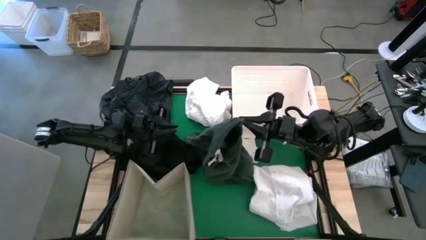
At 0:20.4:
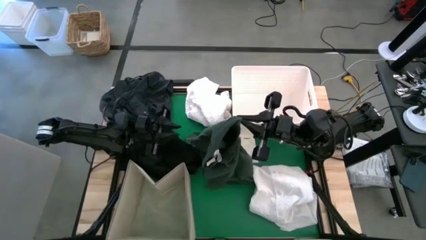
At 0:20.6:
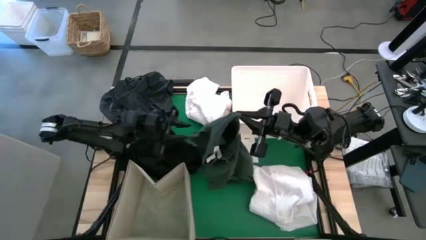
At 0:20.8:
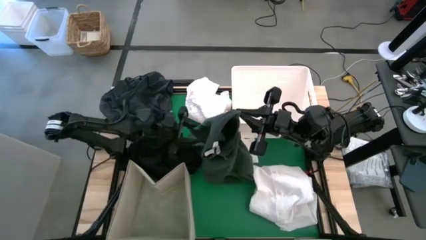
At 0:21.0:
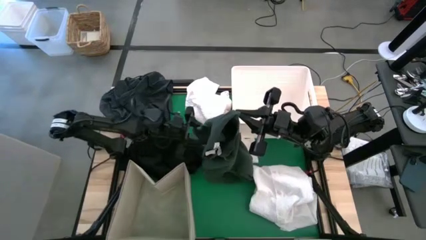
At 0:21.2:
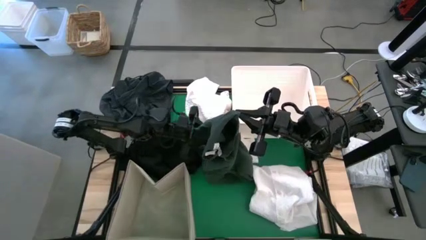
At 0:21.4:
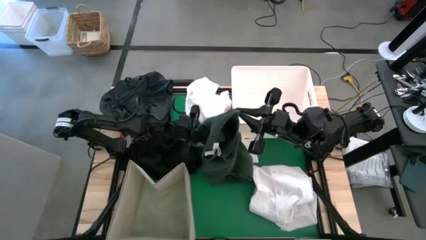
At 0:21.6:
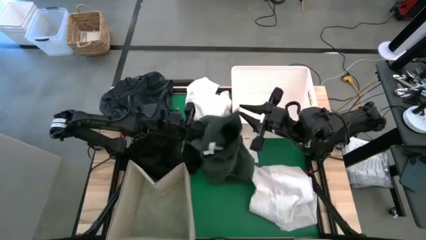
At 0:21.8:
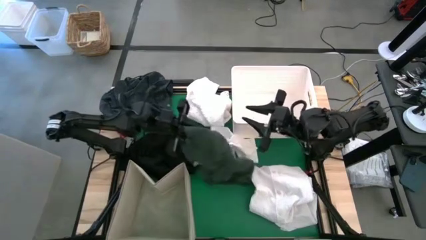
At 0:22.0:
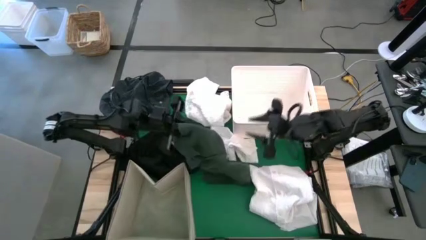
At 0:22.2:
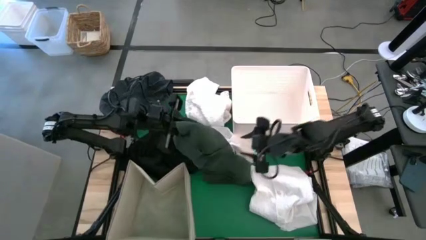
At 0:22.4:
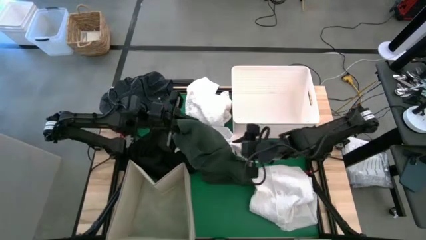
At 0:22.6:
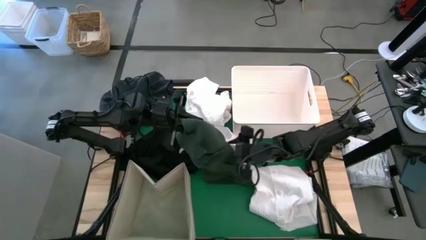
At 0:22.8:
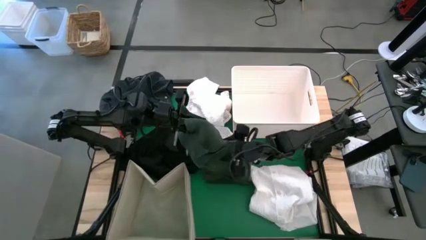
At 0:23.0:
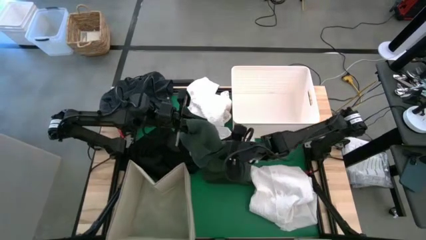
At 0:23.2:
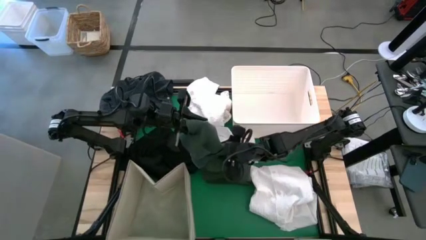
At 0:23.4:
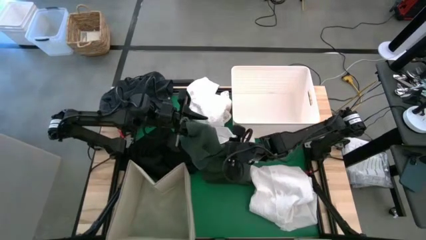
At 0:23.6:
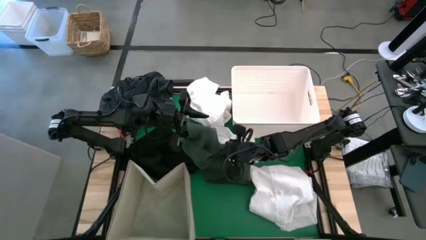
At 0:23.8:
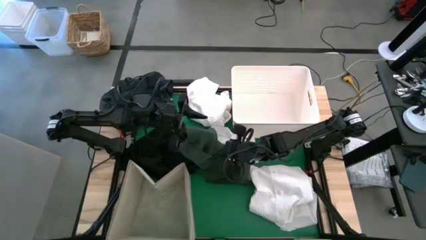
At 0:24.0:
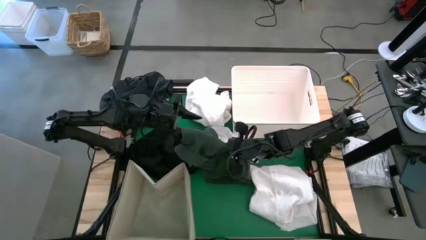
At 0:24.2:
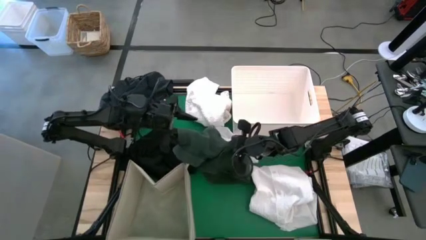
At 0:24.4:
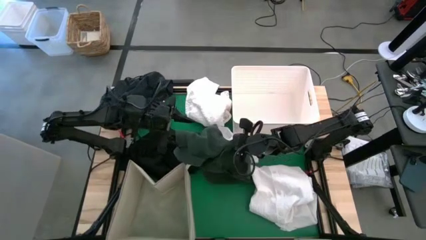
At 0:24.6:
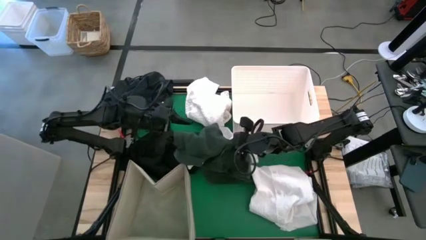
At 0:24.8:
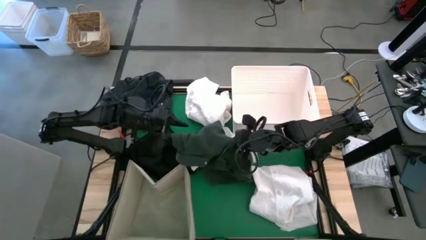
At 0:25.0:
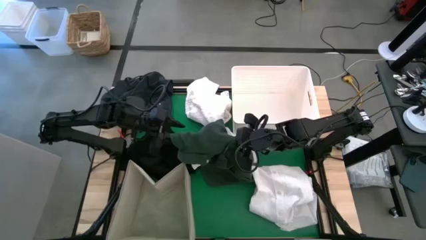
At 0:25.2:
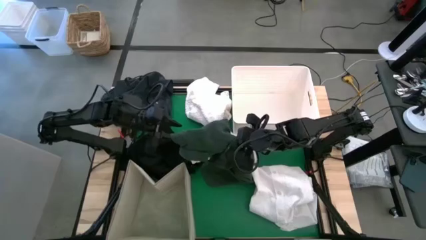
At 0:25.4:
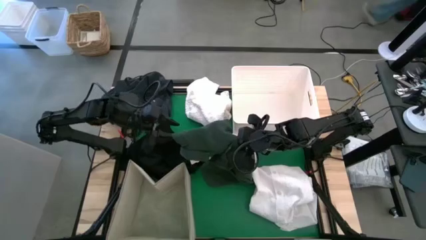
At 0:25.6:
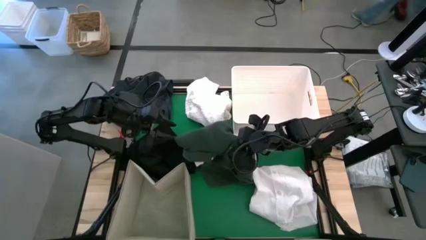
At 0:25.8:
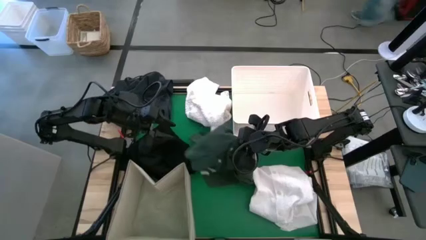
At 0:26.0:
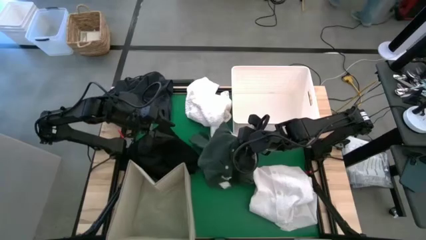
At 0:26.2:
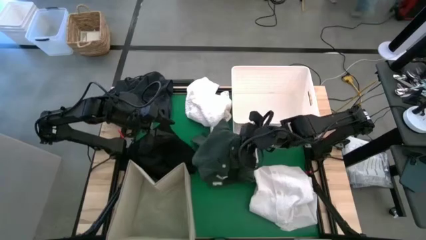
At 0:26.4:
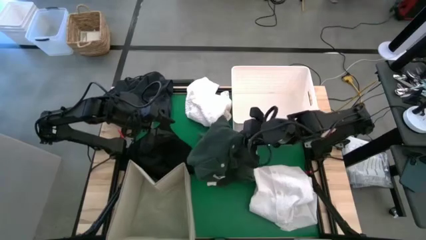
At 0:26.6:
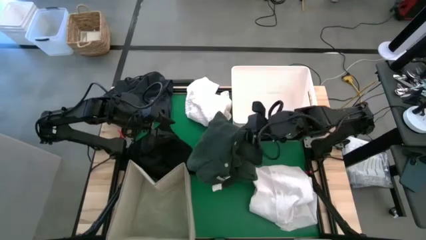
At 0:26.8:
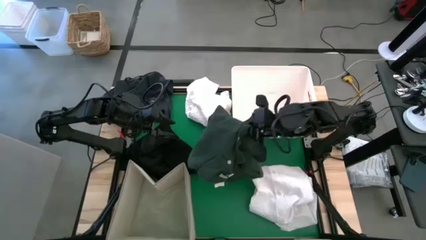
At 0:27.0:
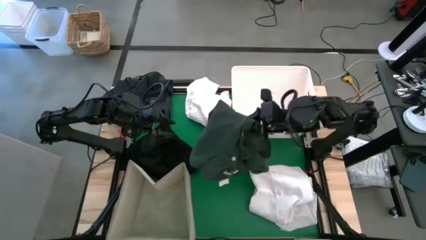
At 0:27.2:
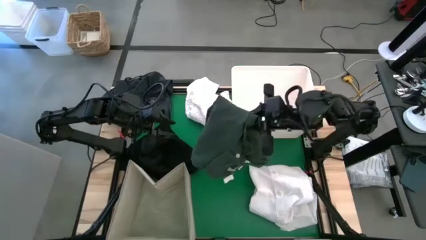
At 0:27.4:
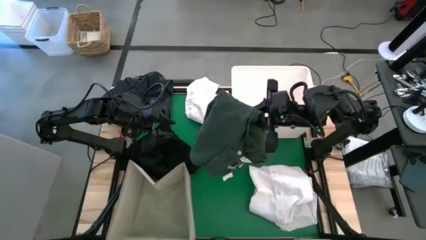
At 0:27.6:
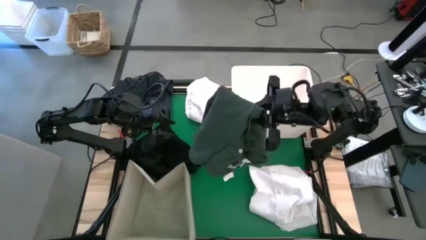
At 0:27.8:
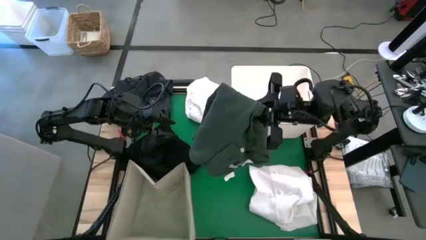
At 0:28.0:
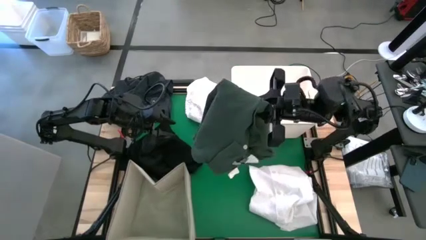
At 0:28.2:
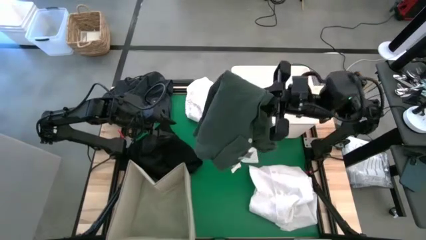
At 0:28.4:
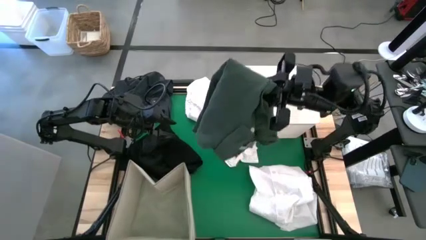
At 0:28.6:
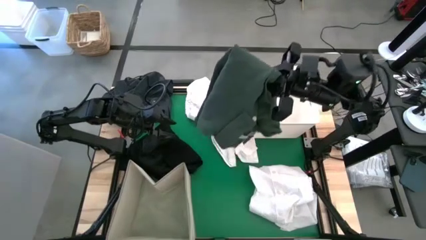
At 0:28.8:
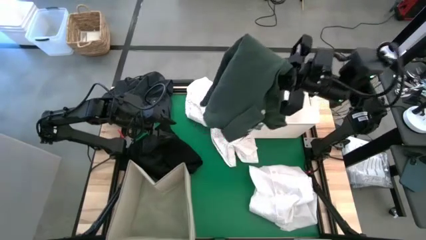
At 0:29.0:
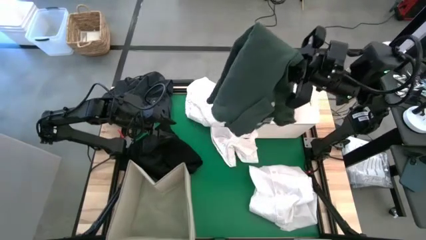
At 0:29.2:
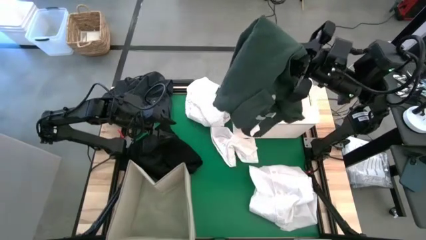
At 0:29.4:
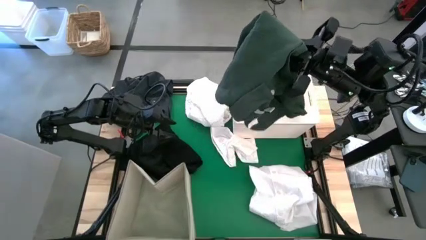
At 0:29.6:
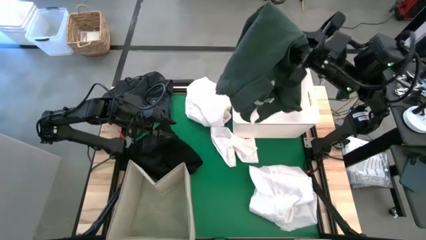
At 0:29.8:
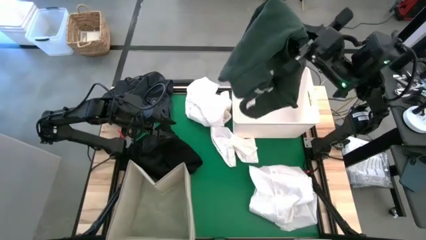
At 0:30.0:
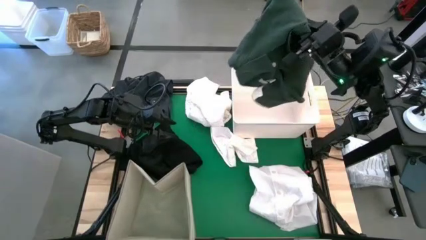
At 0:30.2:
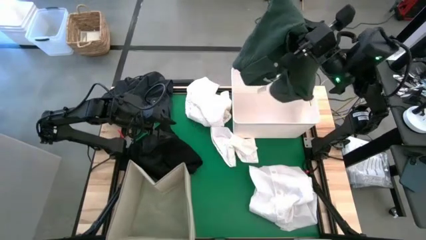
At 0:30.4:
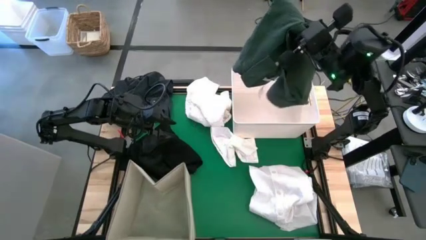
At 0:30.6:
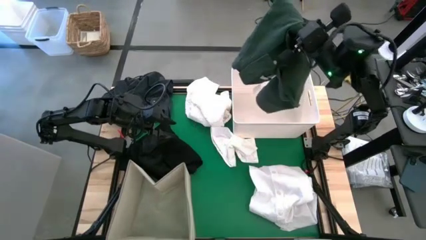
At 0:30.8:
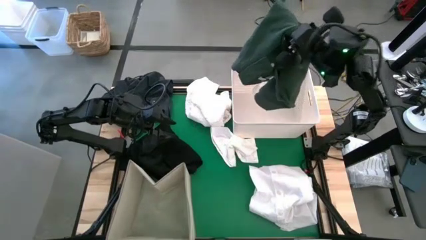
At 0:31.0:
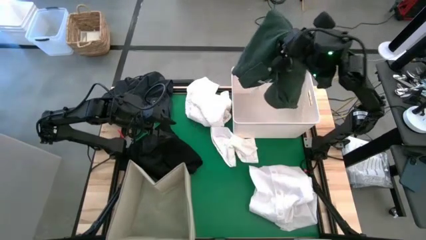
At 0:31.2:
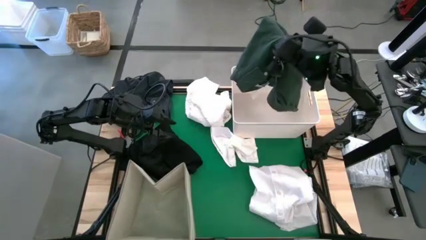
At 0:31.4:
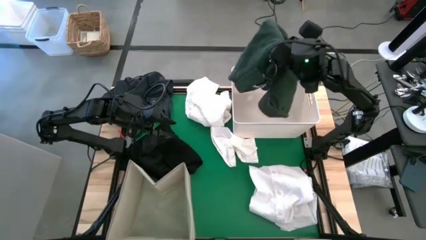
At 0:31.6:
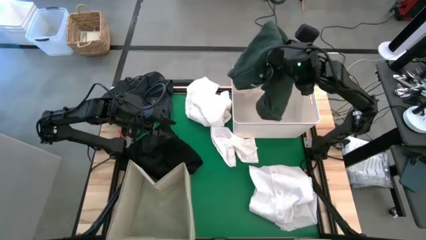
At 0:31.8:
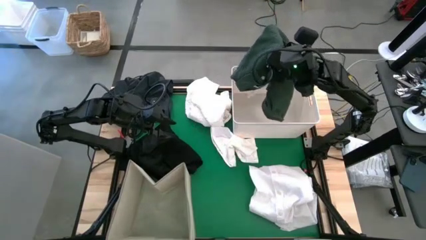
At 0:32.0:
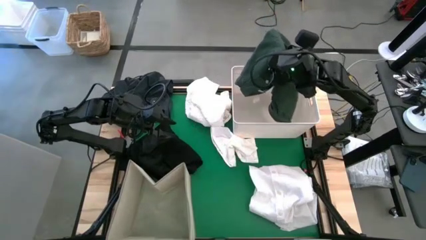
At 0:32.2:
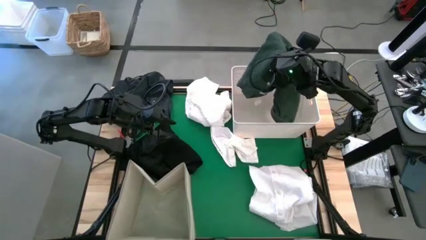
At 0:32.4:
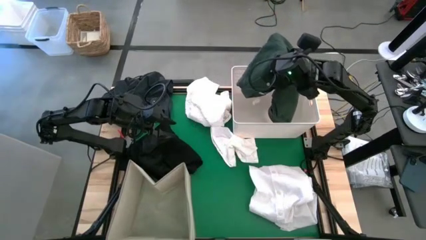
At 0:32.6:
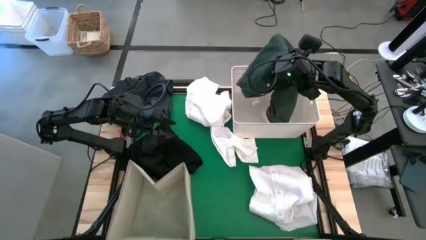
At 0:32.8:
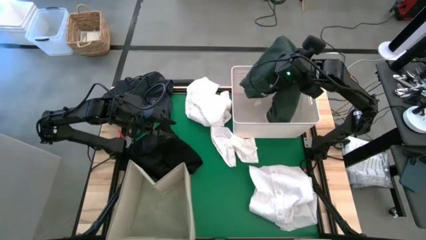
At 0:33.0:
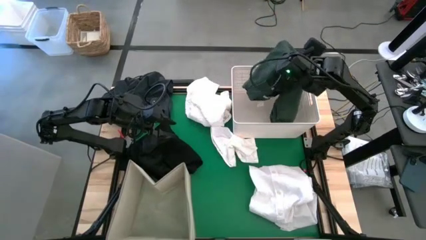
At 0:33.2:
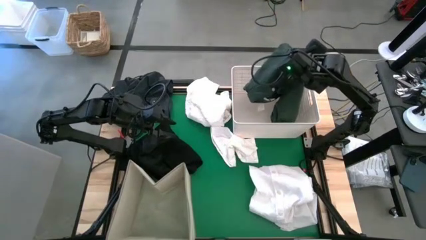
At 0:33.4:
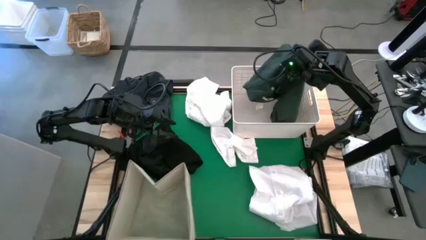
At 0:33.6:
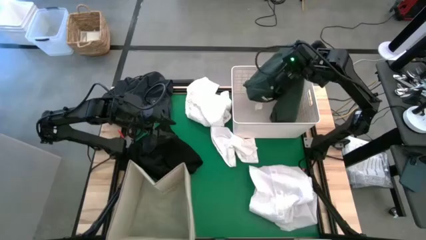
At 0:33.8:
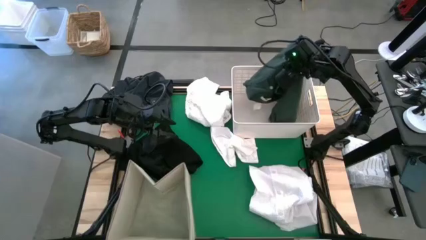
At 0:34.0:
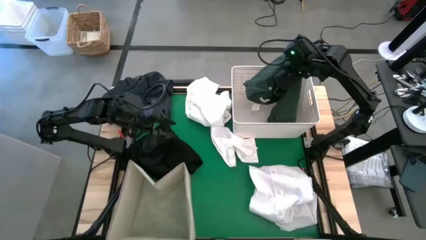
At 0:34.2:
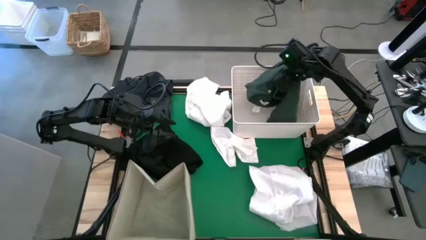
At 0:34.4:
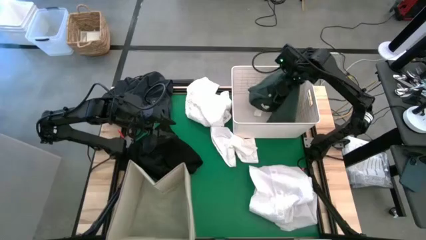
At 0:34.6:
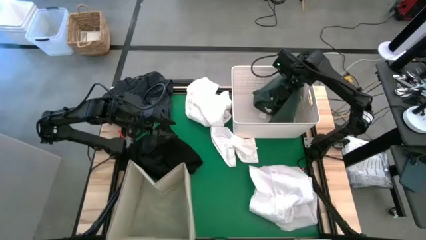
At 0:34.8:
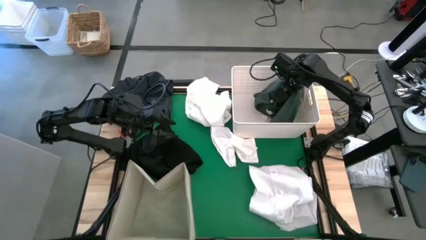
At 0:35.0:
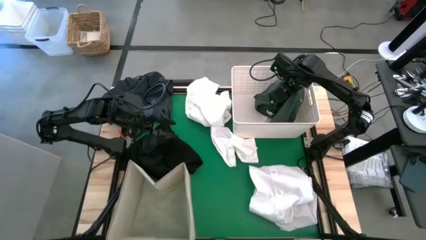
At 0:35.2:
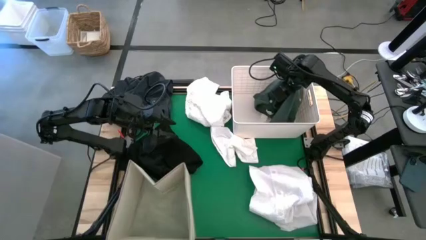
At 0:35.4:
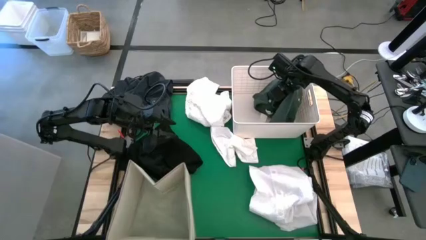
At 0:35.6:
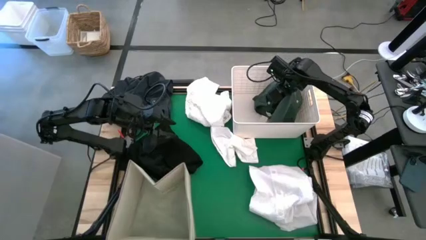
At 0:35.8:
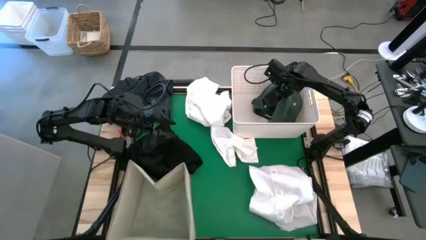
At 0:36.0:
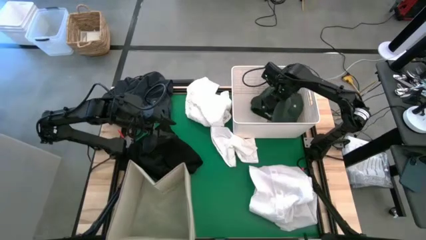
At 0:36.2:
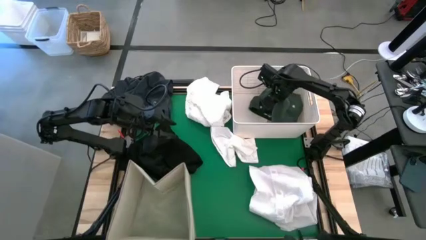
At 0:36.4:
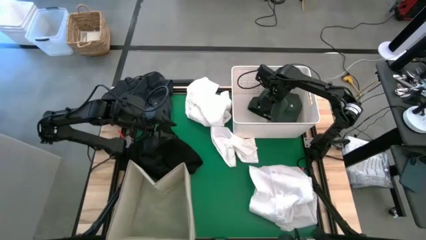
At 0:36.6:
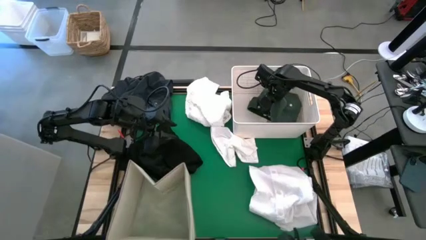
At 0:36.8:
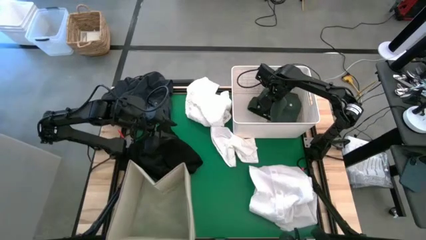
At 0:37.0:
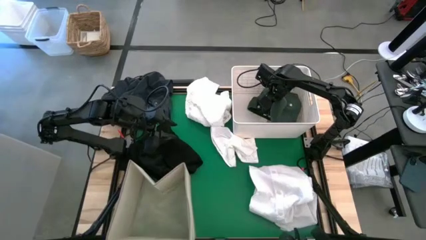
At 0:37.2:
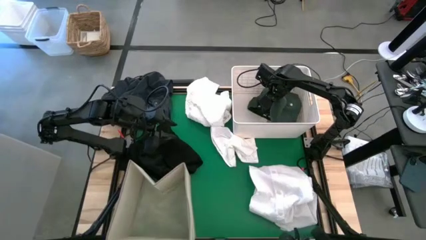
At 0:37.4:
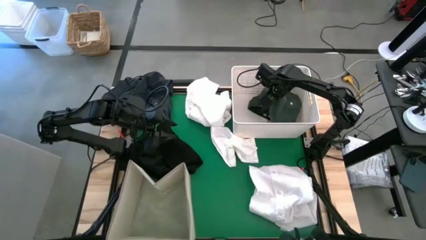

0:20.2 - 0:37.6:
Task: Sort clothes
Put the green polo shirt into the top right white bin
